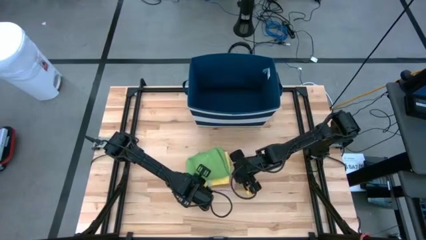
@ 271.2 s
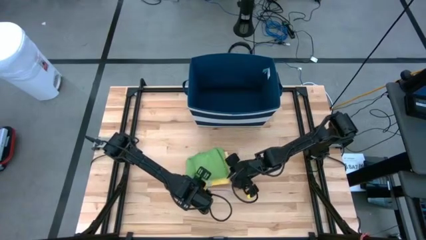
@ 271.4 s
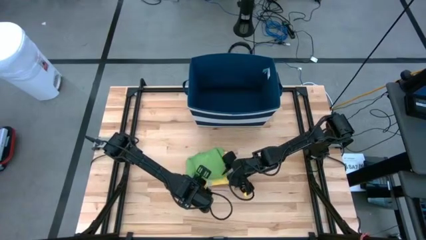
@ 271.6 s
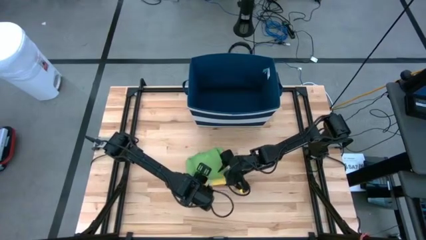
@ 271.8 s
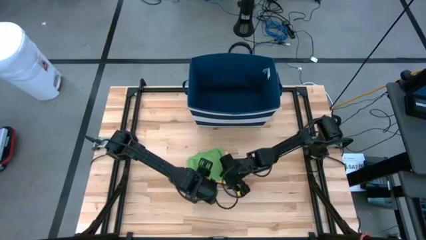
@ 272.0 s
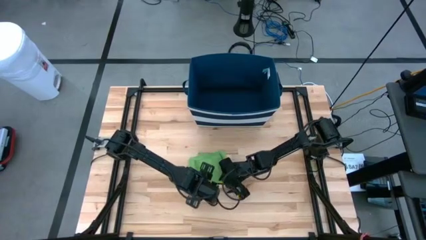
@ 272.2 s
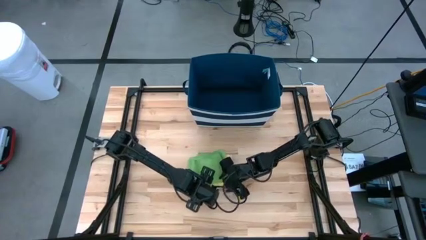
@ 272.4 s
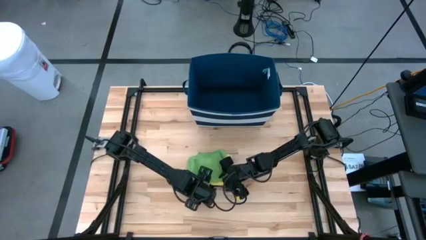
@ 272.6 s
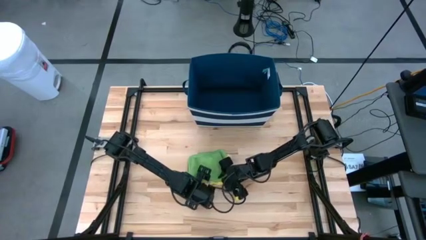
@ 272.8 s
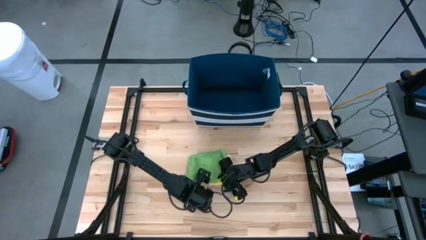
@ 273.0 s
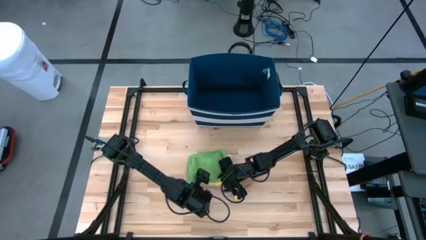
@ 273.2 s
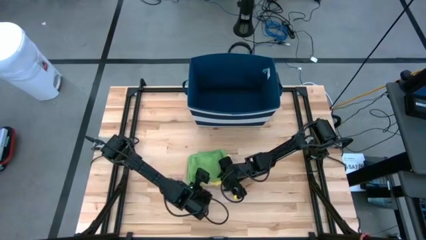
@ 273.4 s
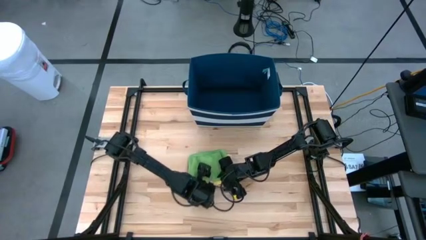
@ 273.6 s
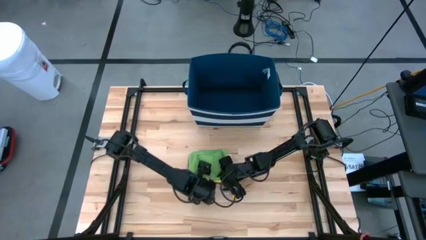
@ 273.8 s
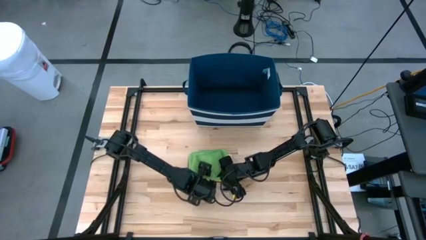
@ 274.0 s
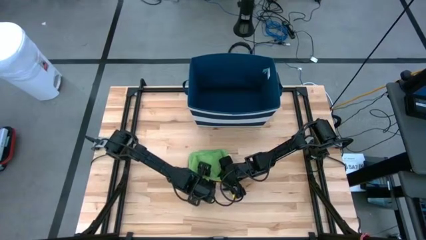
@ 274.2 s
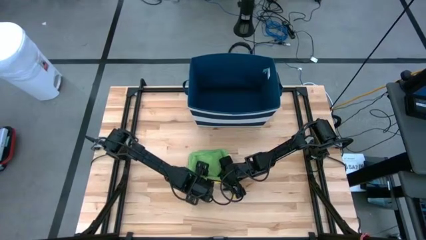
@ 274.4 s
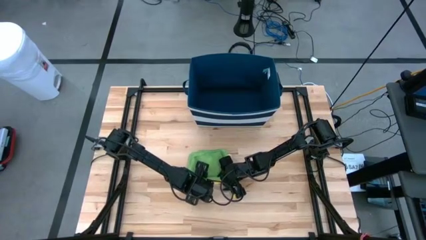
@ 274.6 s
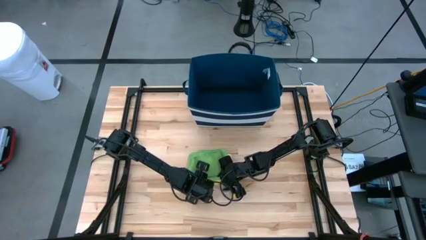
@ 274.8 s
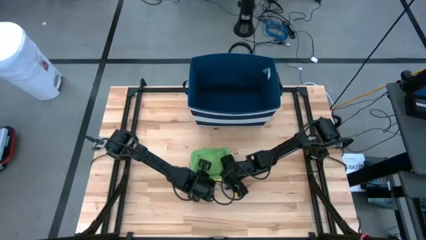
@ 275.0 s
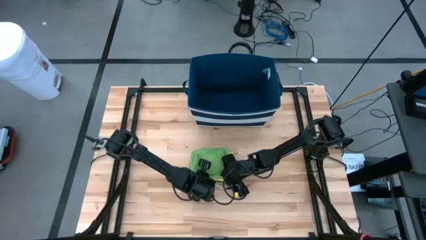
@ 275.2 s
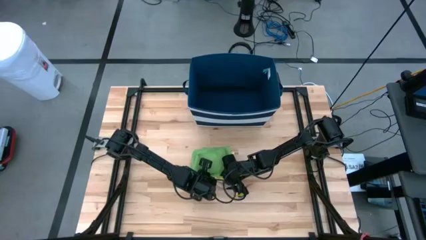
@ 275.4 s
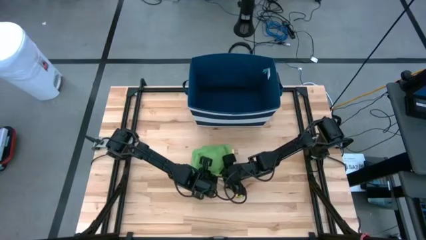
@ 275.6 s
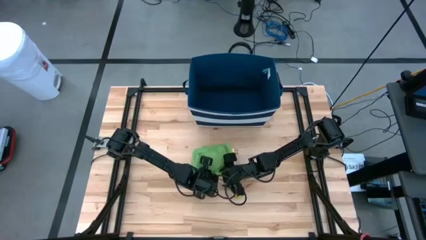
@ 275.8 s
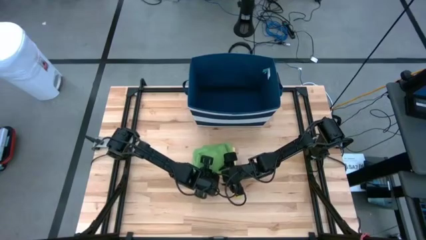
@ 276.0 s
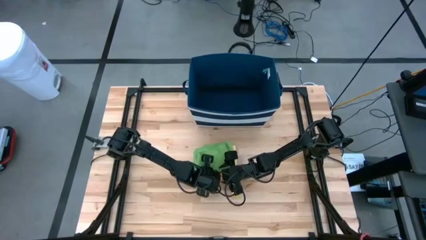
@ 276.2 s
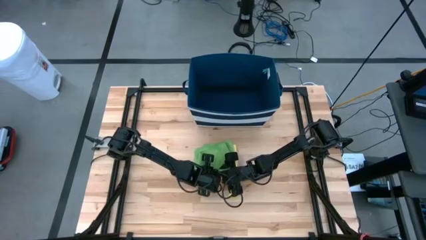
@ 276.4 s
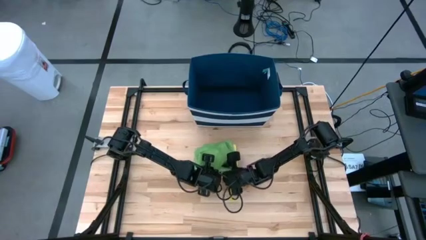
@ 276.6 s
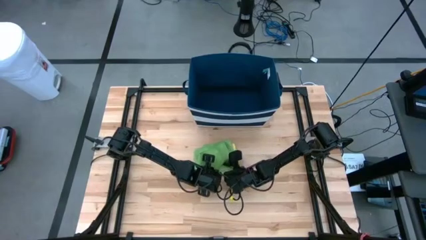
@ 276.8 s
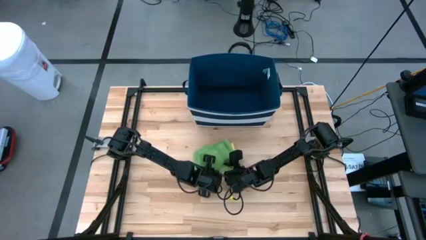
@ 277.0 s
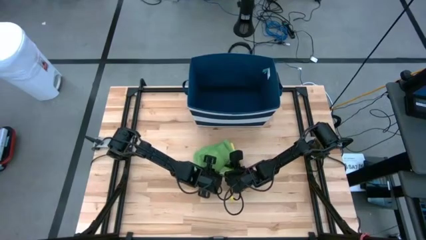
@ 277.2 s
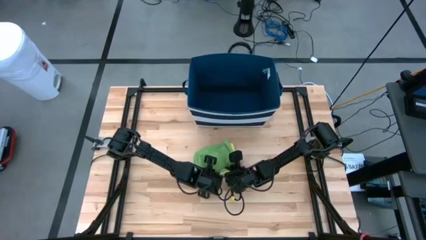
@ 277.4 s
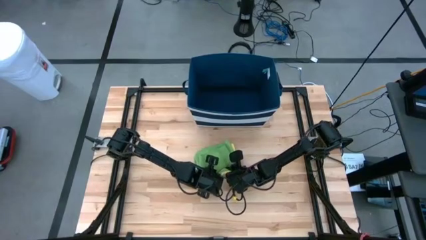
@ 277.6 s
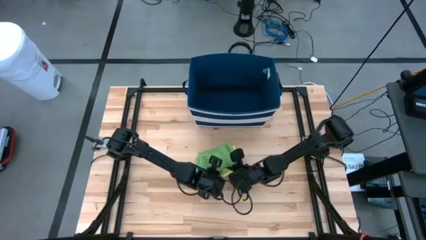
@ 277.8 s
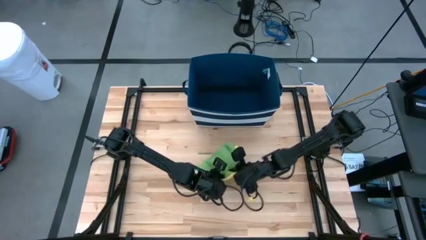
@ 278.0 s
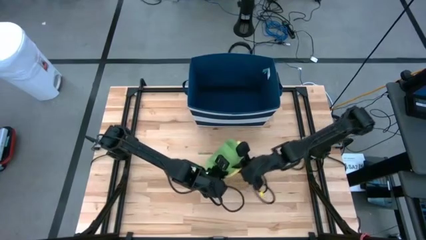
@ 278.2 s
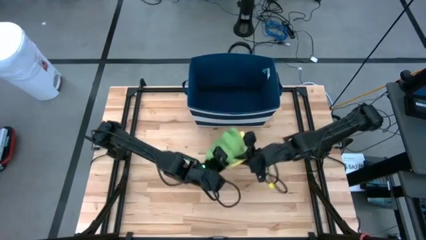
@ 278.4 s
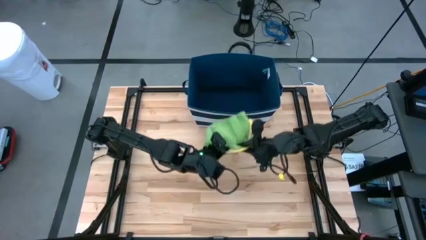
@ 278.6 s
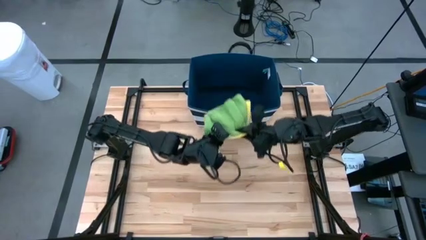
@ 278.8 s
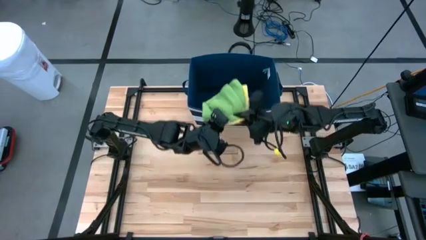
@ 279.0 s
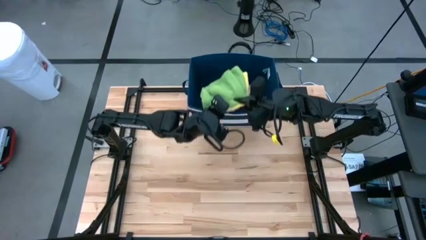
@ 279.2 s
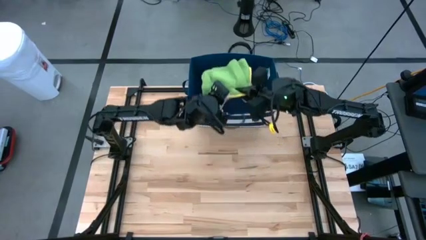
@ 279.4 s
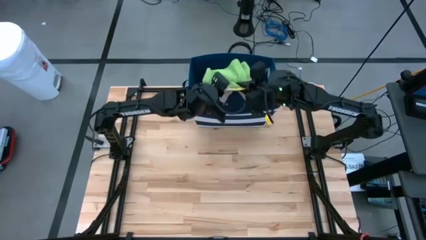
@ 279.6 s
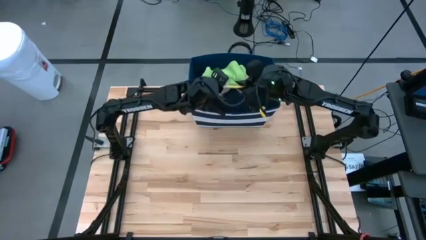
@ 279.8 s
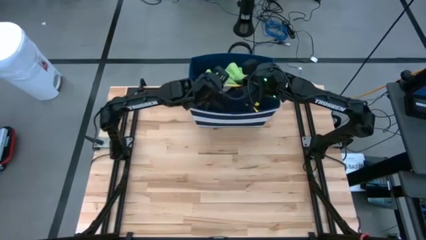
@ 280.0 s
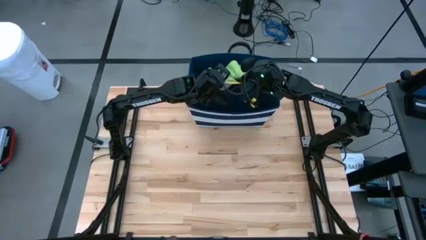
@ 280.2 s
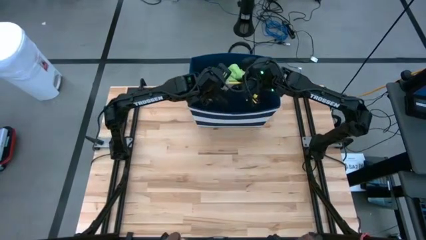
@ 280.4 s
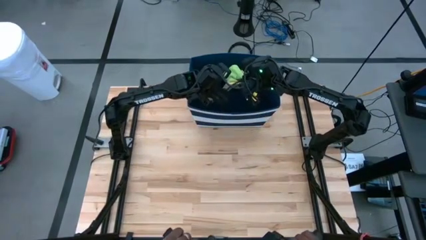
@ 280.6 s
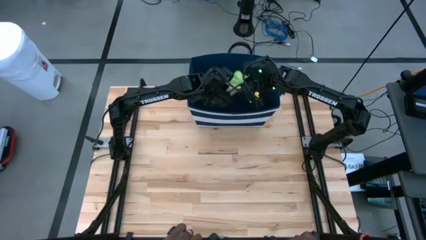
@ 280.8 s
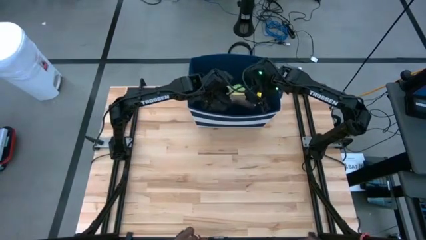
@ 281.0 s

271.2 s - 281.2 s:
Task: Fold towel
Put the stack of folded towels into the laundry organizer

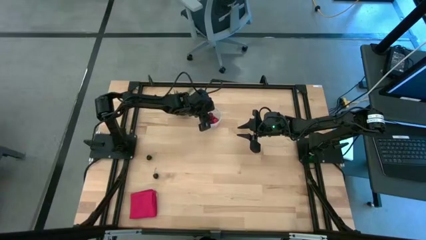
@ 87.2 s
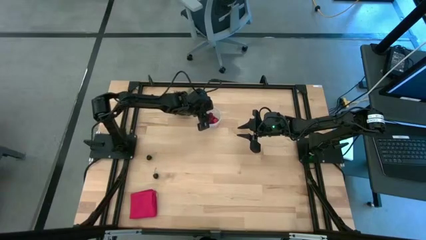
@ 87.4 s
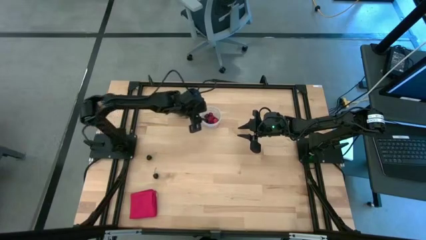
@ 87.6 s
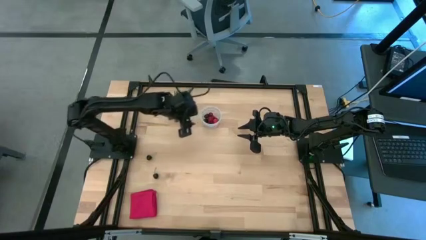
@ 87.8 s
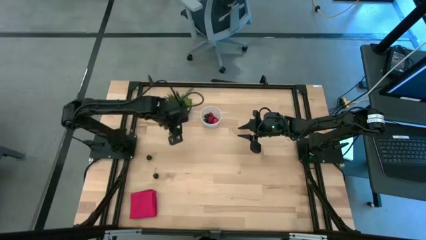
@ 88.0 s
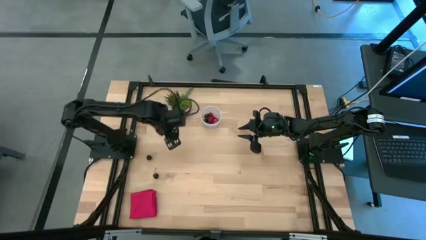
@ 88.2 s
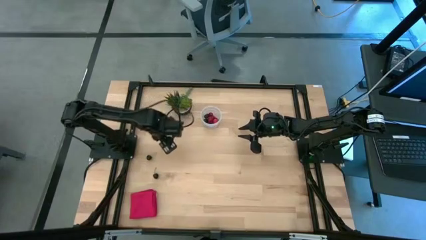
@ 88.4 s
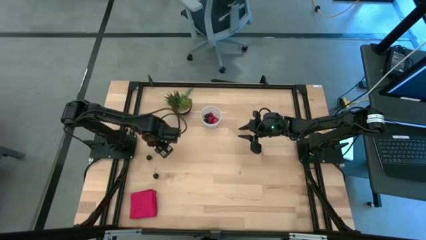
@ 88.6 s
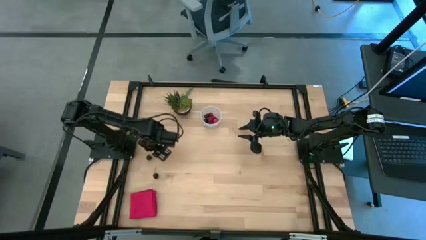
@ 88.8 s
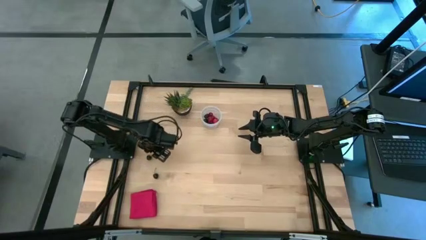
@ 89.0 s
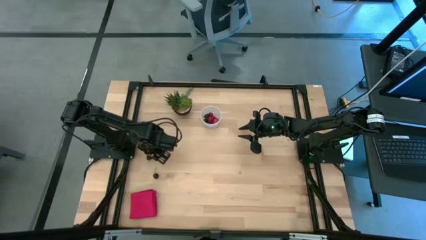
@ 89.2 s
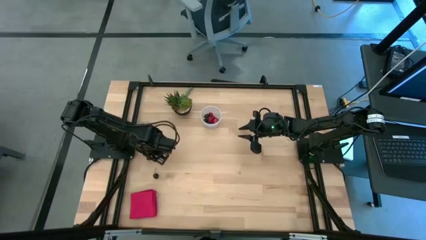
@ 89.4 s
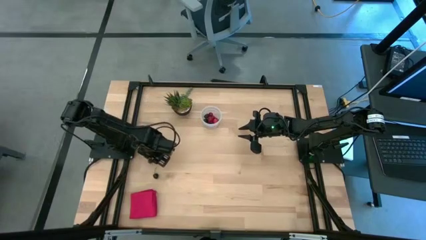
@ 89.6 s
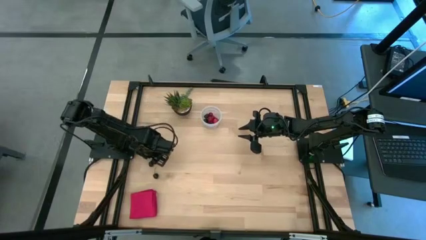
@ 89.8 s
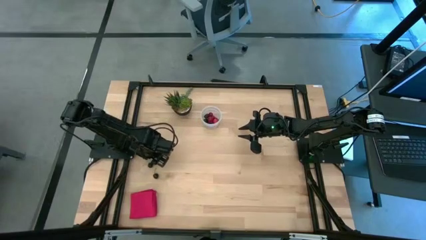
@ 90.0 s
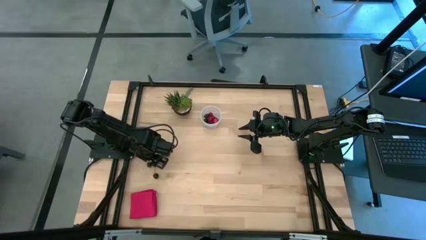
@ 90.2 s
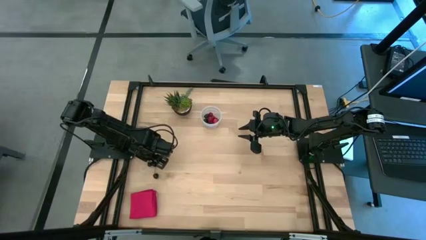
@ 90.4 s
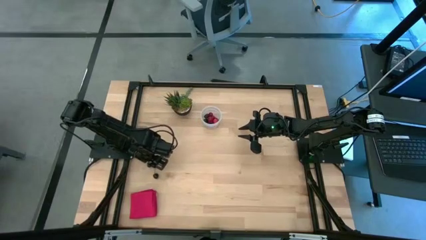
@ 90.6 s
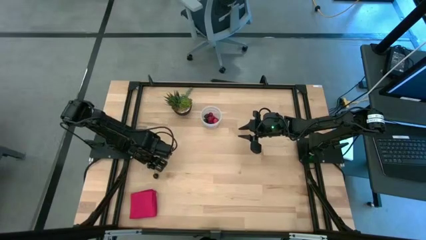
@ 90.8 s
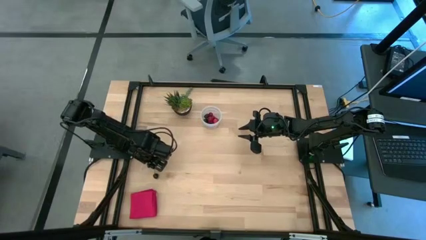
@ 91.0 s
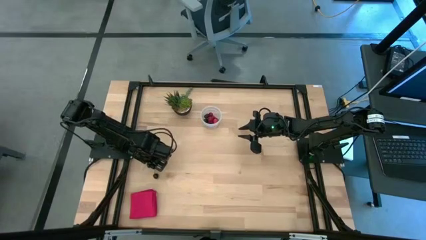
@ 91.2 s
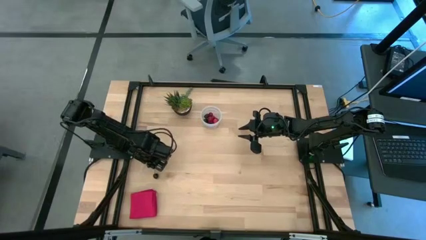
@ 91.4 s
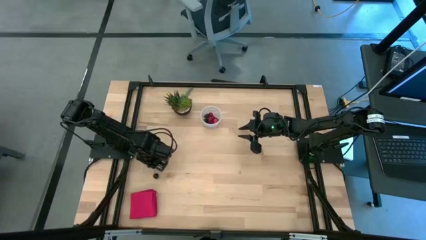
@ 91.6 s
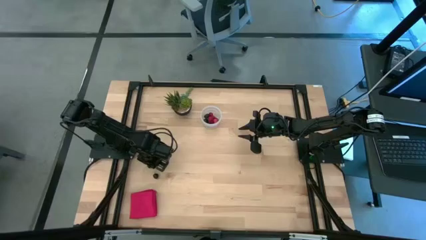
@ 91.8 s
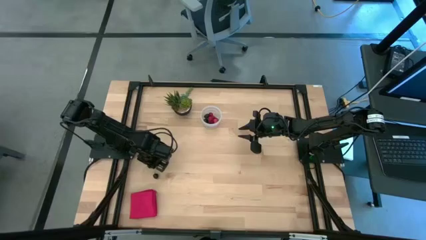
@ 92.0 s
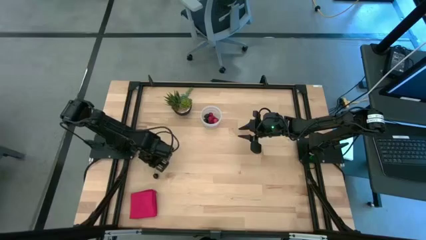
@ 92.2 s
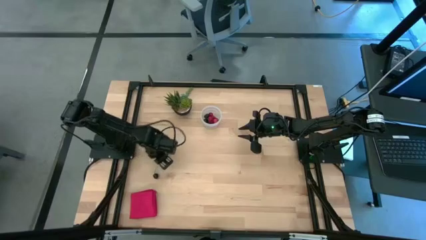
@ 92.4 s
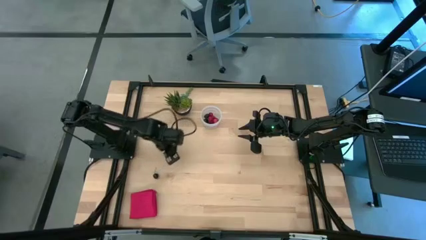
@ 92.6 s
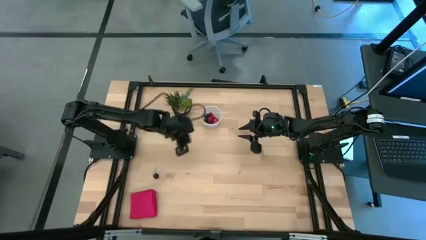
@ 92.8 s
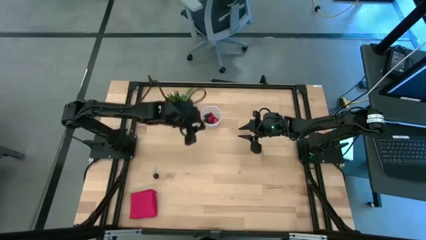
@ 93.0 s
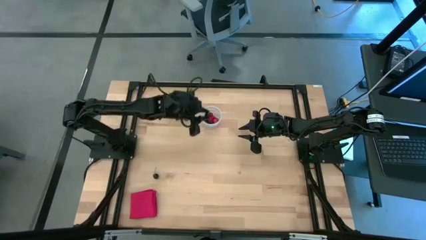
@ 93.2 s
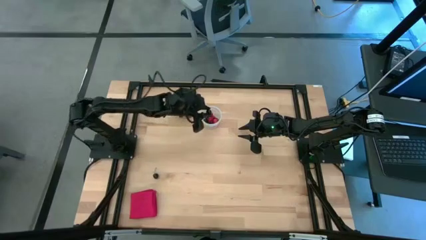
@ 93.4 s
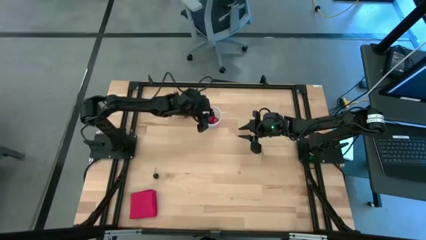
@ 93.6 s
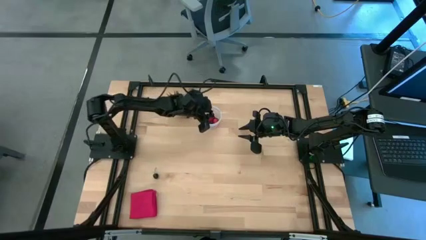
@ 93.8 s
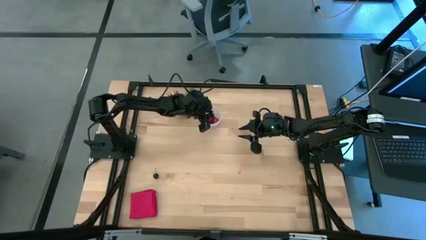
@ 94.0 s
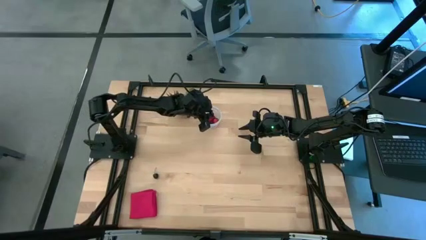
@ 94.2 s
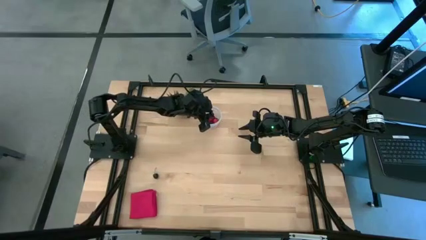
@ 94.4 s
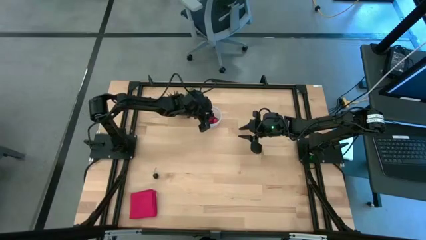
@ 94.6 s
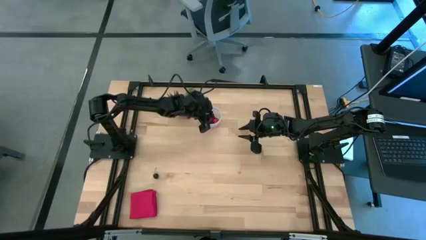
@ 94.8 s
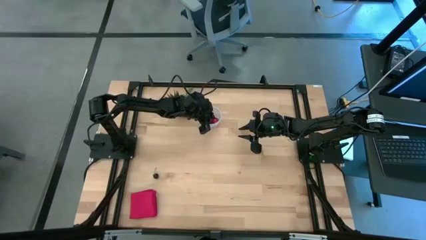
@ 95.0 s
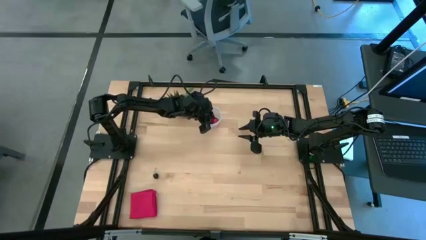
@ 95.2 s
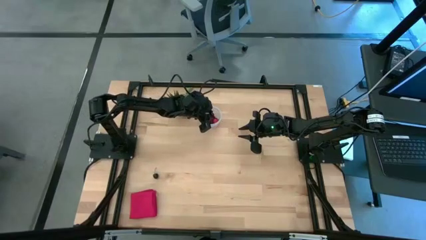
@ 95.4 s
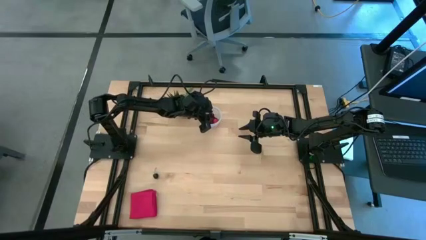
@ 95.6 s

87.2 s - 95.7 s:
Task: Pick and placing Produce into tupperware
Put the black cherry into the transparent container
